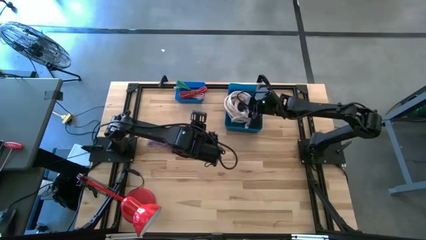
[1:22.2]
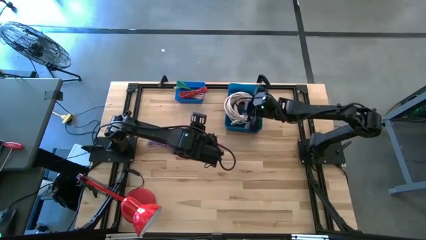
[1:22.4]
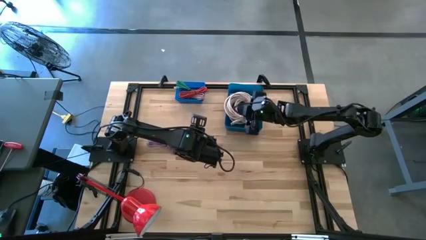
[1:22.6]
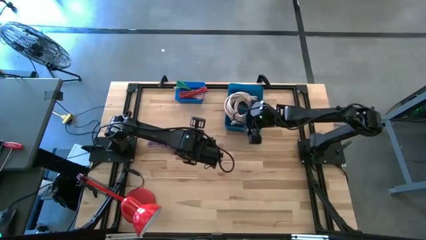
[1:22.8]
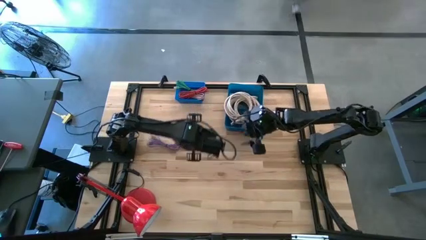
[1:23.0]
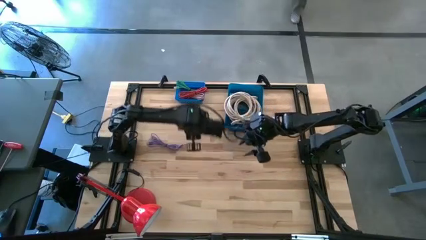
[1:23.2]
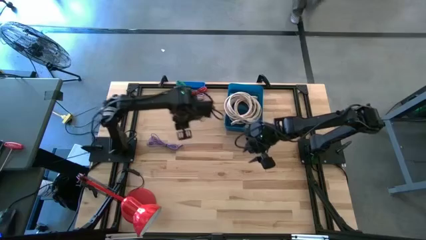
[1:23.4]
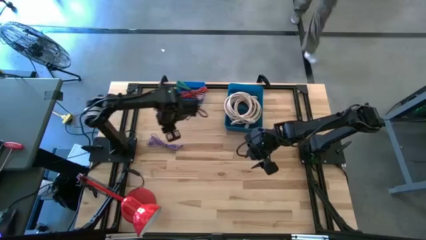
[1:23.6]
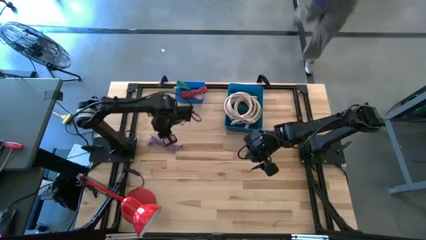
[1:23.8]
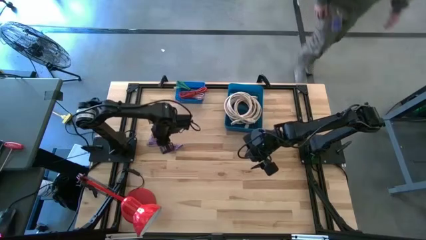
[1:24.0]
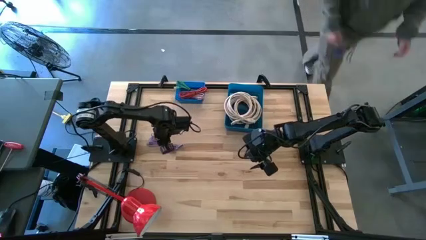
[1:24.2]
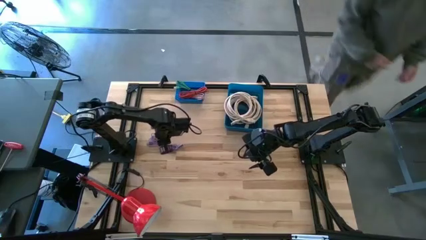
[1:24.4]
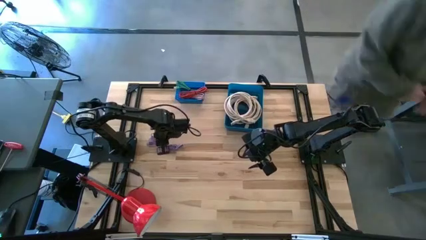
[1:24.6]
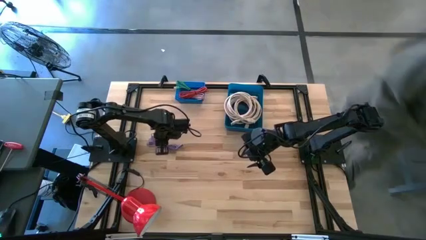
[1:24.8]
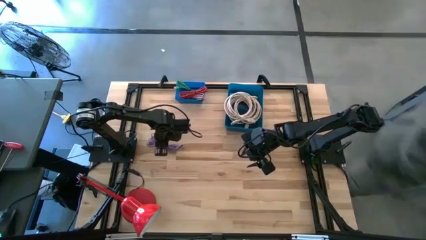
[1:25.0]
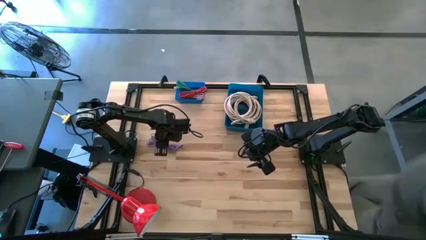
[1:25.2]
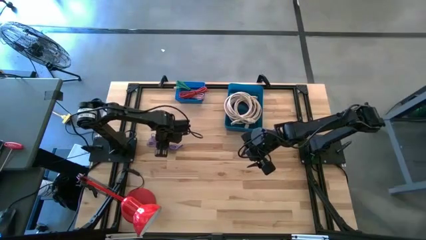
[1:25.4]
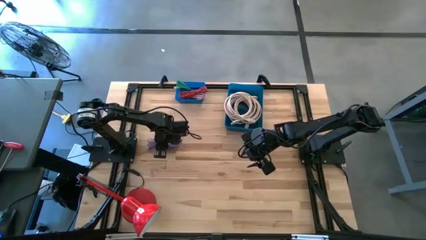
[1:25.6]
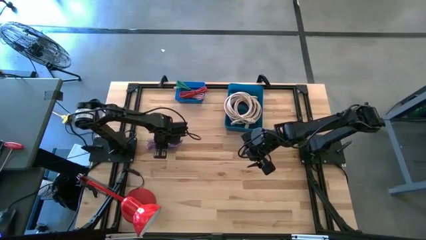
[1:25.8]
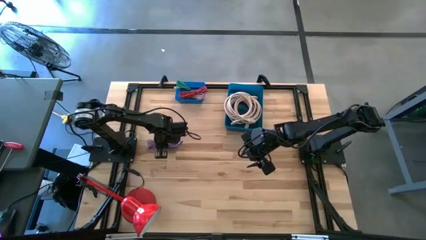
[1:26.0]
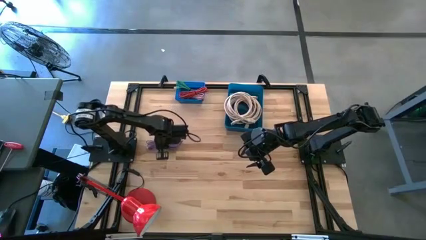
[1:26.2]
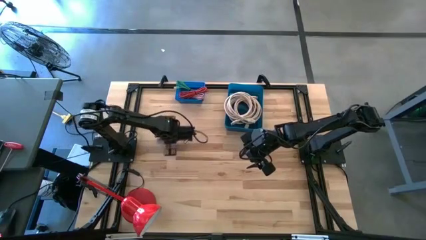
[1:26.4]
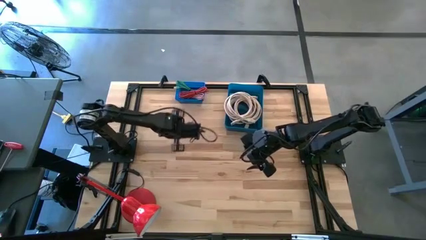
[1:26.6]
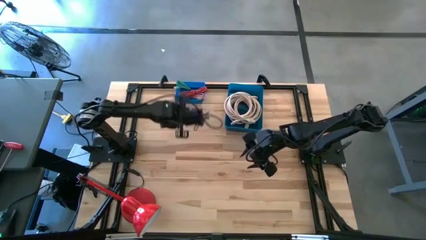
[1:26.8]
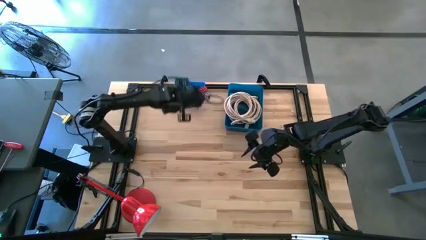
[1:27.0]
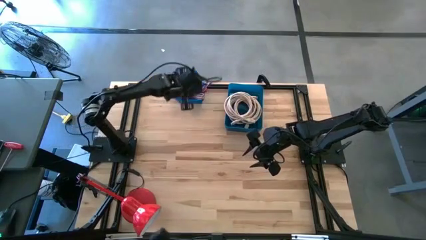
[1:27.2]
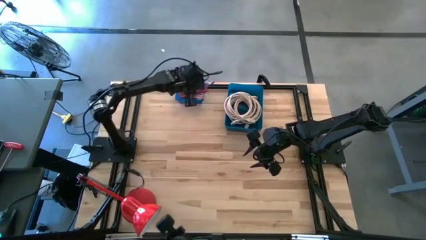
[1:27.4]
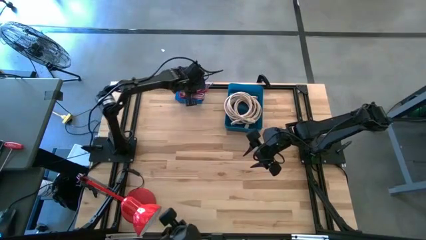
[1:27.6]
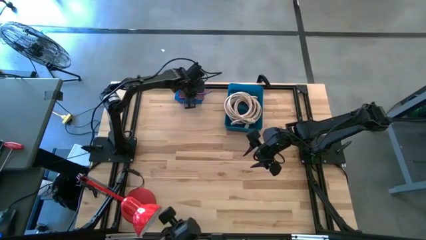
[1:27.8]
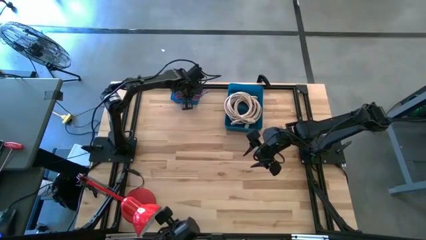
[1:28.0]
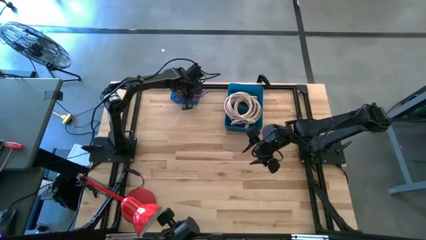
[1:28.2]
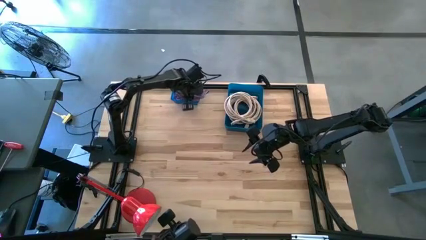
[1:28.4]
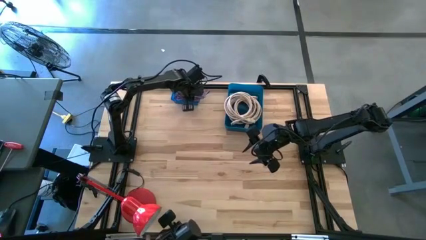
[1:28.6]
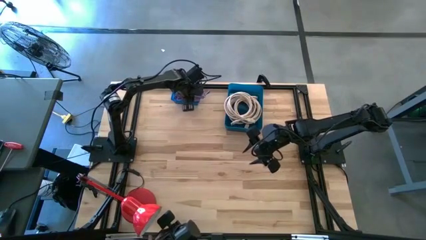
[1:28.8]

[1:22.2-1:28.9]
Task: Pick & Place USB Port
Put the purple charger cable into the blue bin

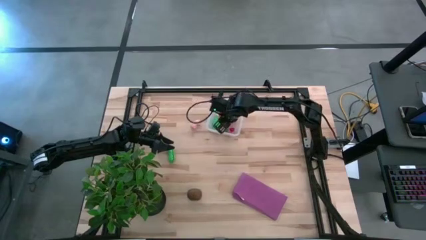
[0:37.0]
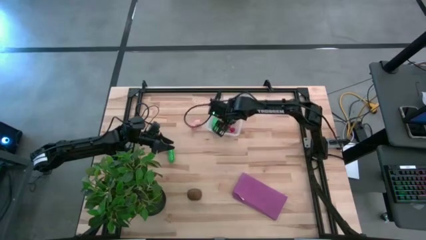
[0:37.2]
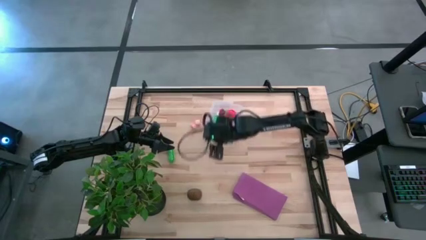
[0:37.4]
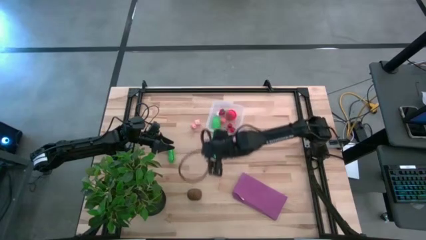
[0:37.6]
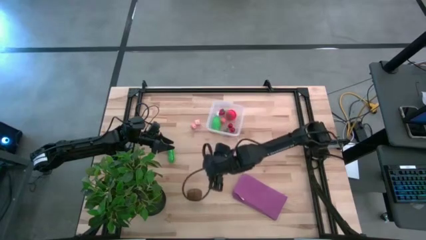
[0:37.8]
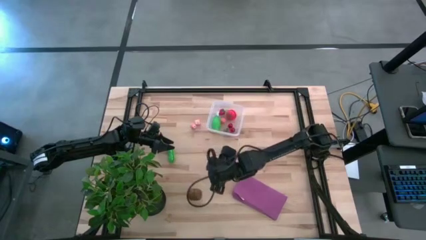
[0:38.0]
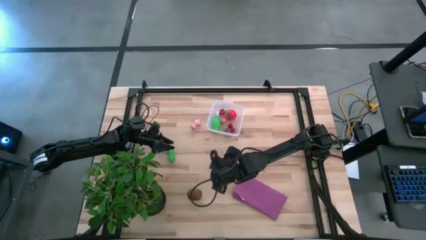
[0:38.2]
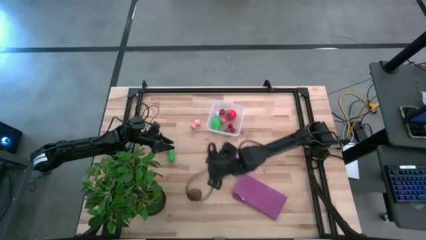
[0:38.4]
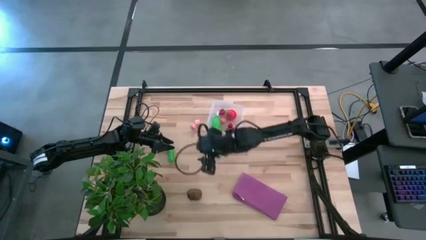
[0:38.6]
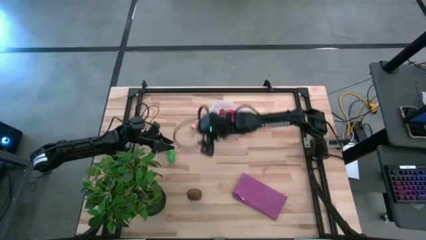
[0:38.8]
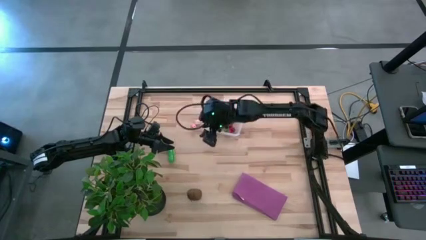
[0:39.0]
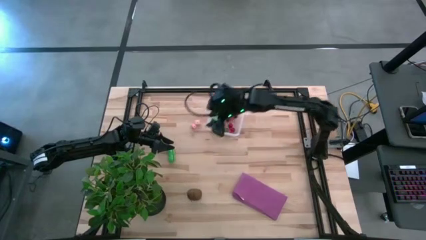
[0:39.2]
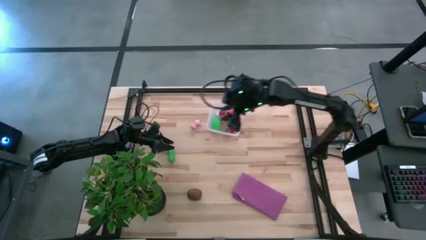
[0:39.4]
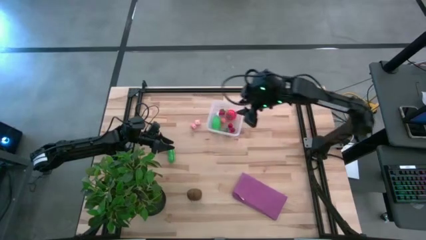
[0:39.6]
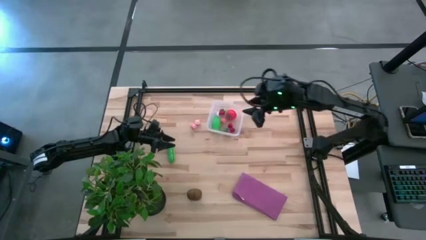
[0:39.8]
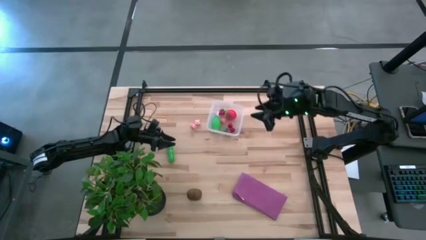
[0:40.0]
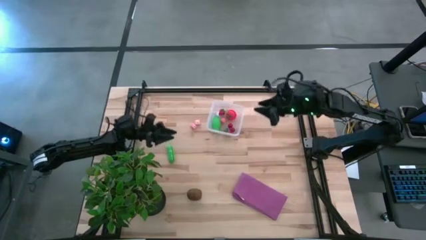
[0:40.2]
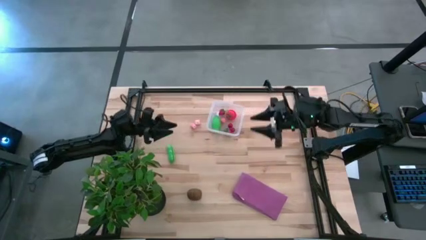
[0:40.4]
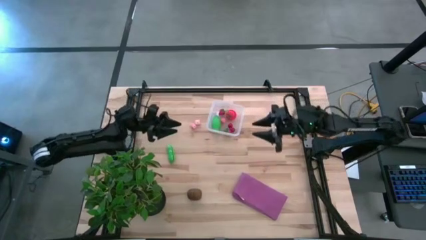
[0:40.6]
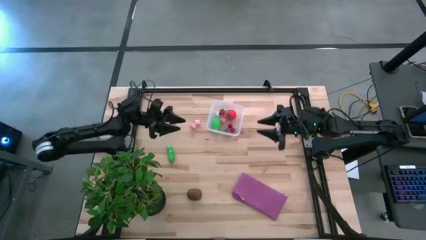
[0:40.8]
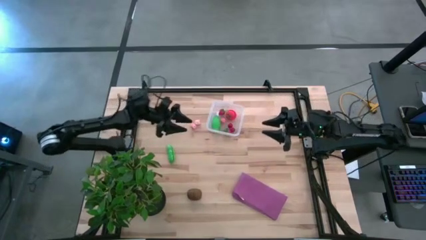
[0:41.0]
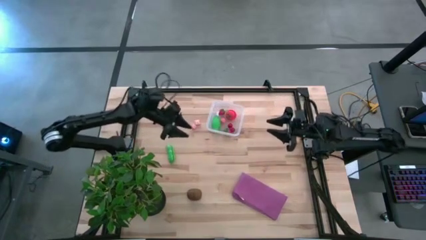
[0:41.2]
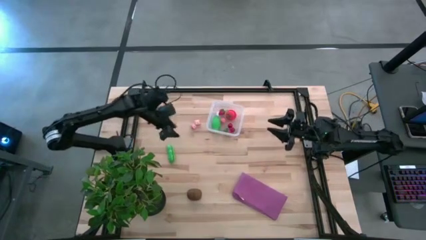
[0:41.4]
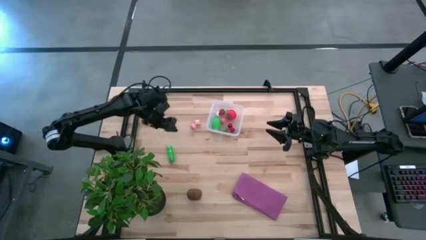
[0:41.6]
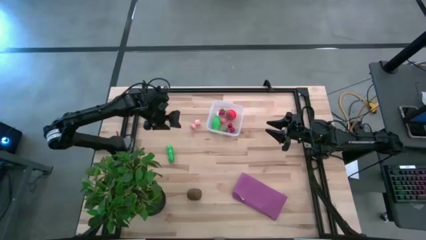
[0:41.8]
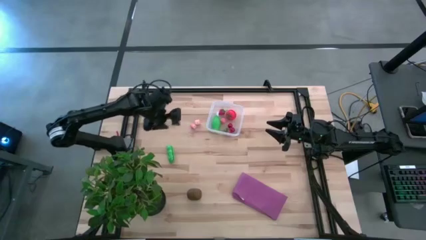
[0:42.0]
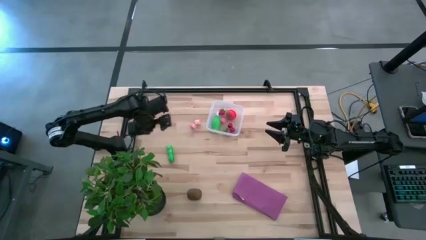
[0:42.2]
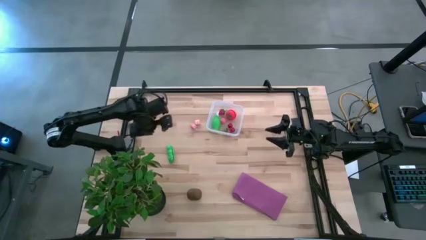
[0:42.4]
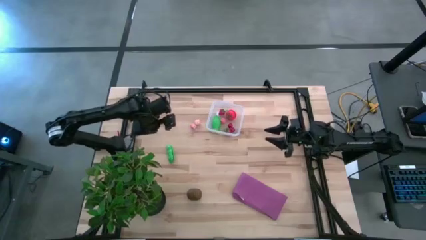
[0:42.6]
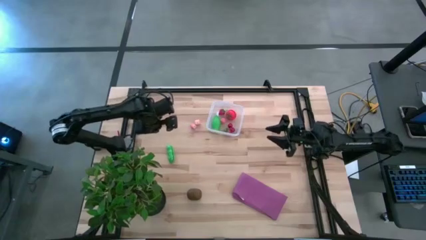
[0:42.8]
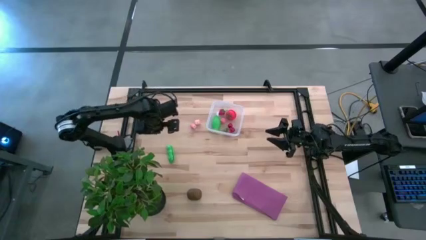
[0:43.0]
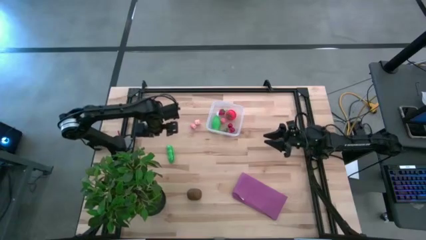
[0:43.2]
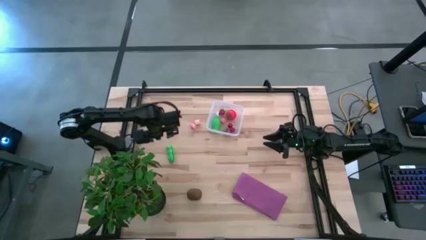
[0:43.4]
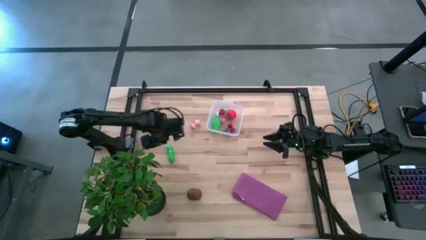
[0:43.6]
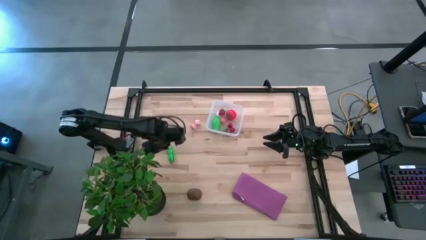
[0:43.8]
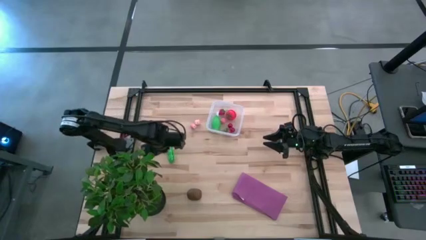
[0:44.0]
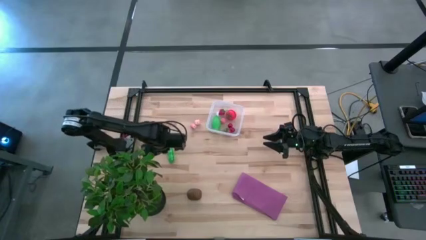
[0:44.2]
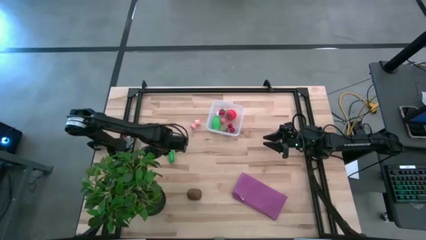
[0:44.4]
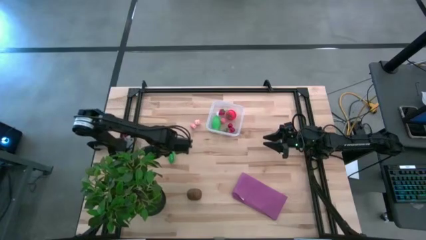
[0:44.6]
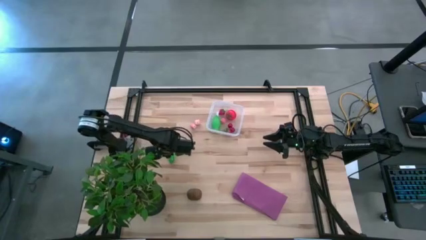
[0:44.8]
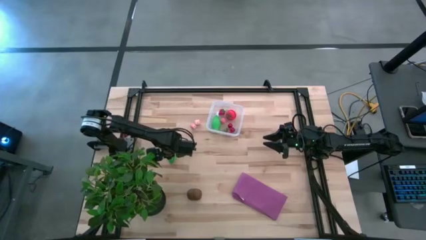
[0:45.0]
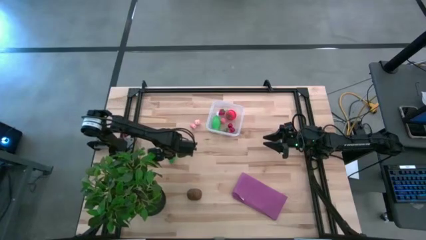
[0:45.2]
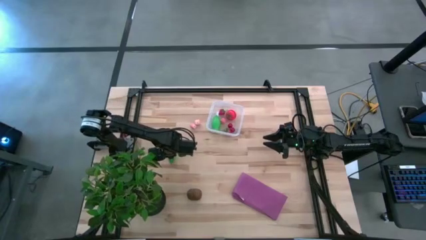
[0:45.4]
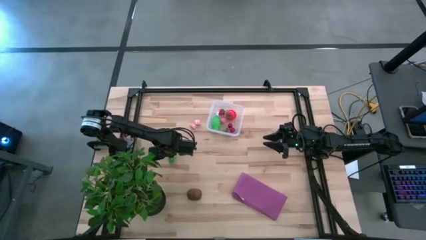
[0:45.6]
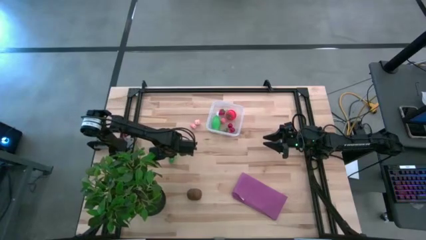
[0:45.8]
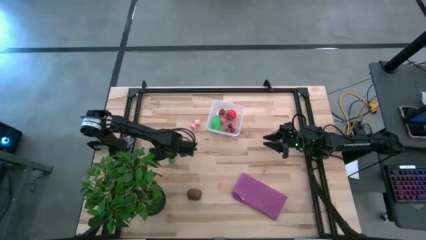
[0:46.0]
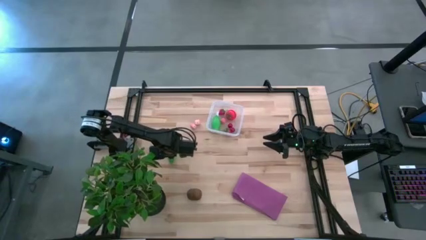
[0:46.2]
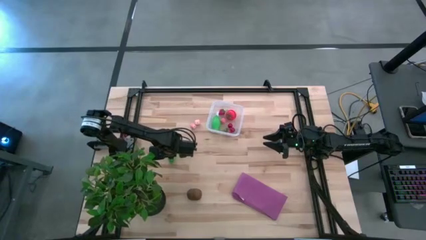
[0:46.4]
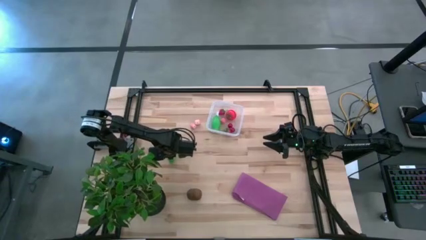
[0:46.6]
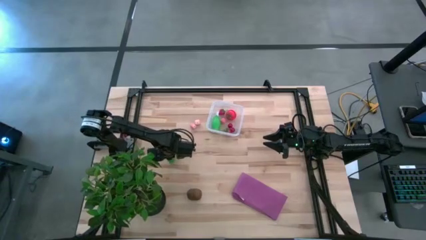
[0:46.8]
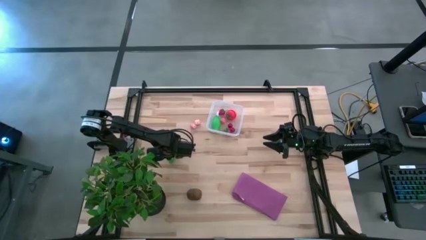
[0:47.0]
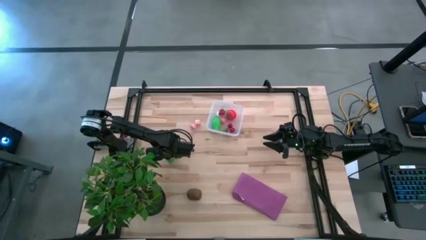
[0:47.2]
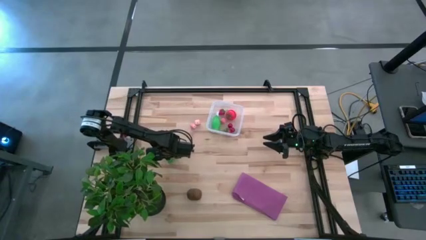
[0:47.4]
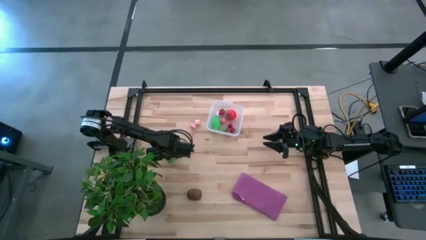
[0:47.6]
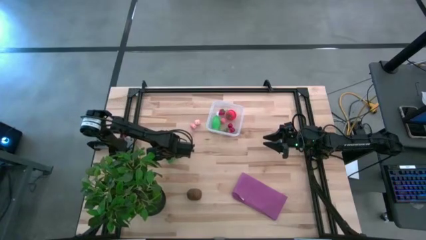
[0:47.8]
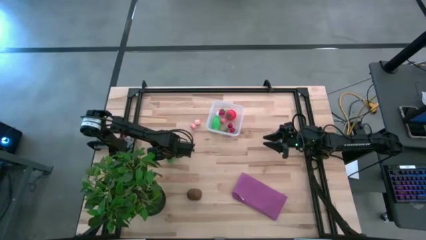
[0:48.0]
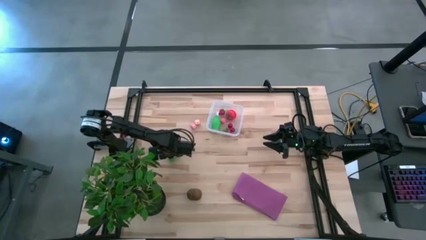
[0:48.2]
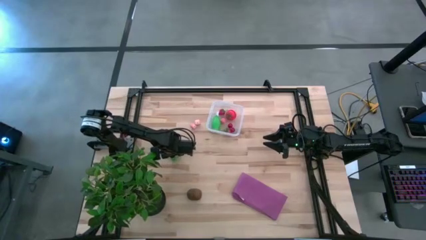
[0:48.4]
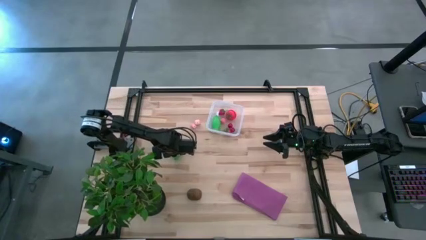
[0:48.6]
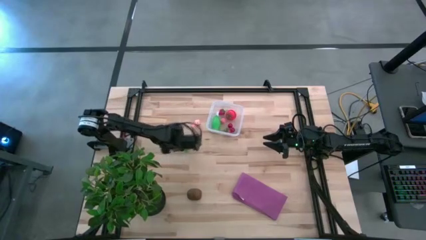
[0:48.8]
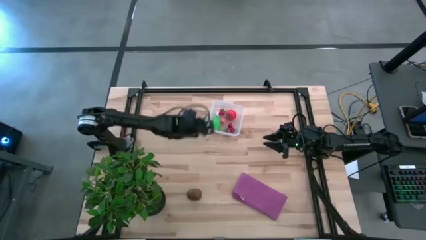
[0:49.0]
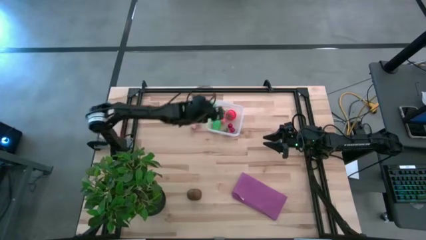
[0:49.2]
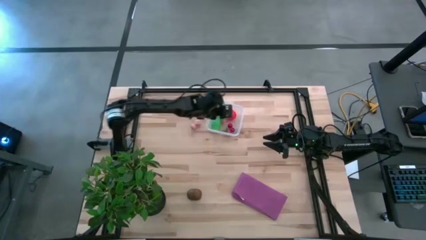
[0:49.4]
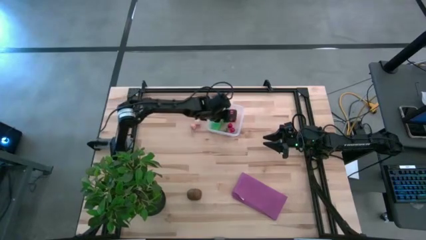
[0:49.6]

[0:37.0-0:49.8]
Task: Pick and placing Produce into tupperware
Put the green peas in the transparent bin
